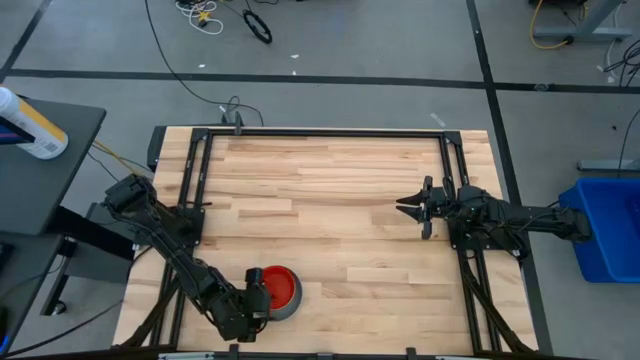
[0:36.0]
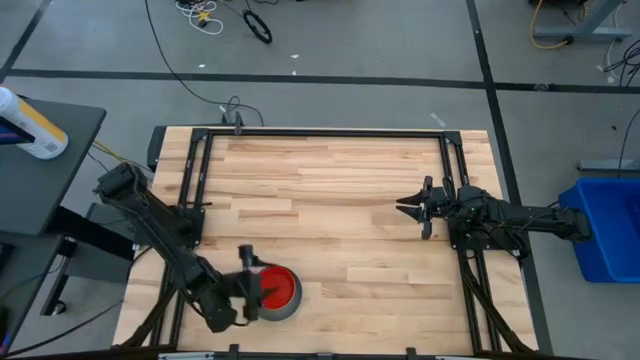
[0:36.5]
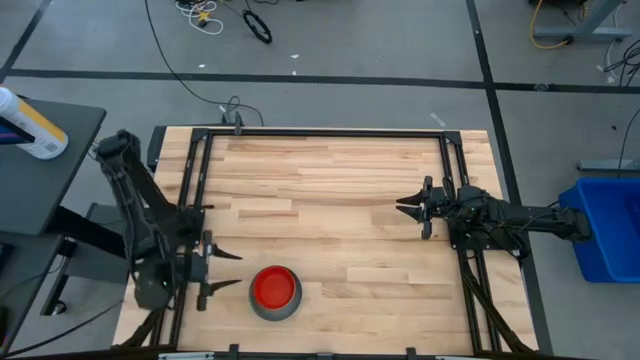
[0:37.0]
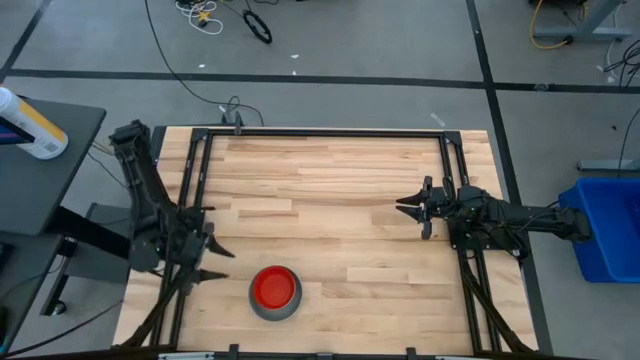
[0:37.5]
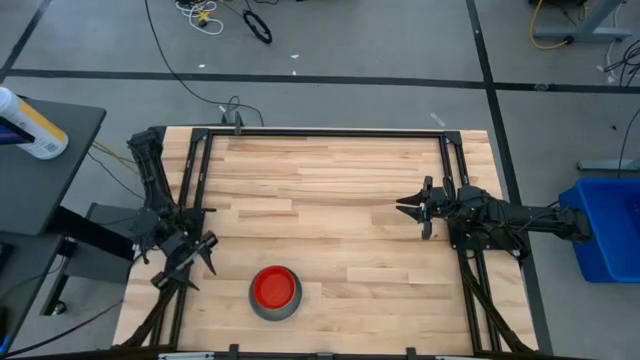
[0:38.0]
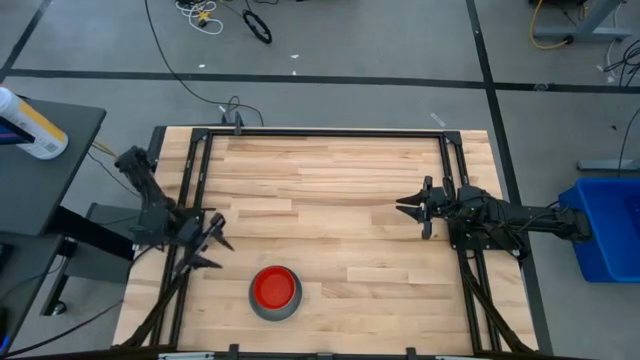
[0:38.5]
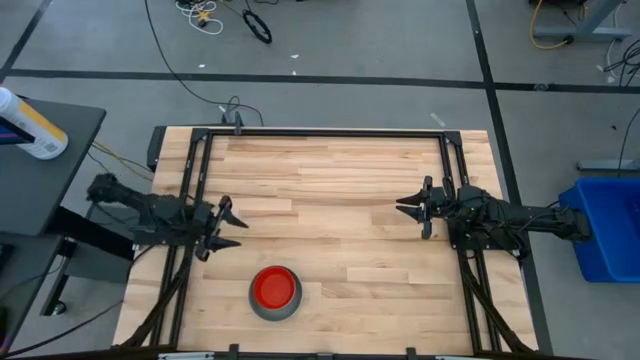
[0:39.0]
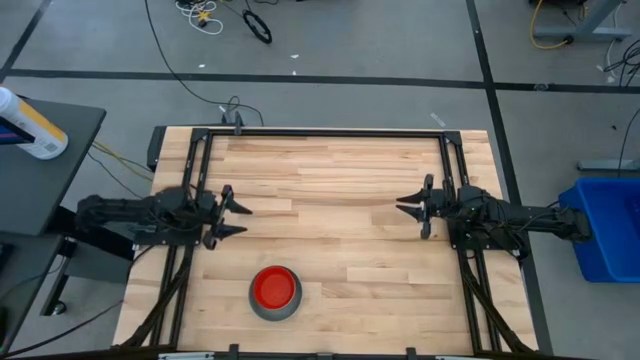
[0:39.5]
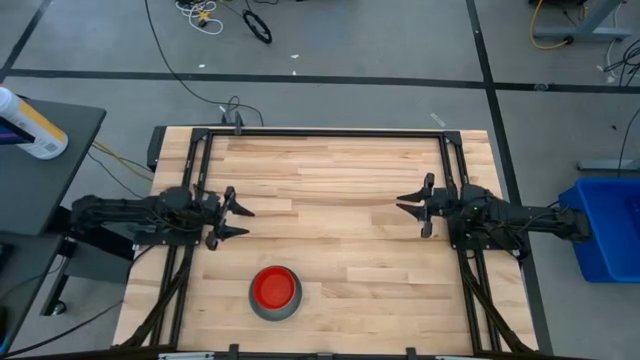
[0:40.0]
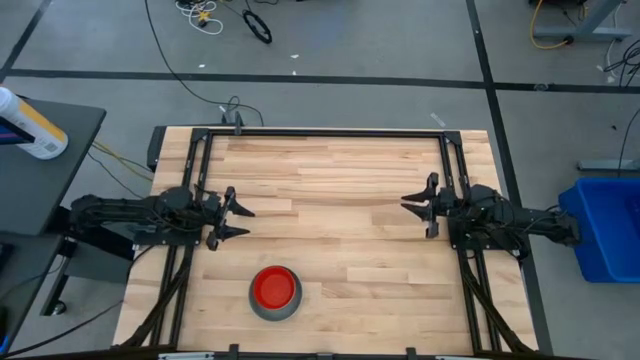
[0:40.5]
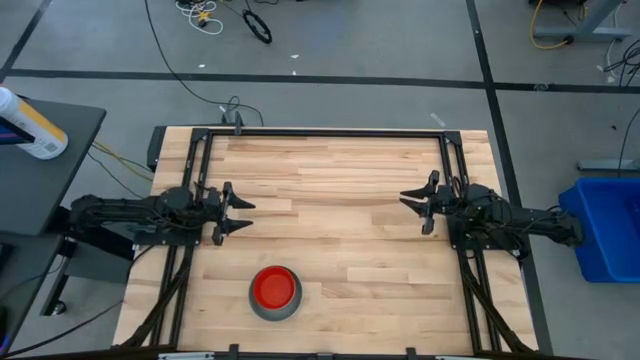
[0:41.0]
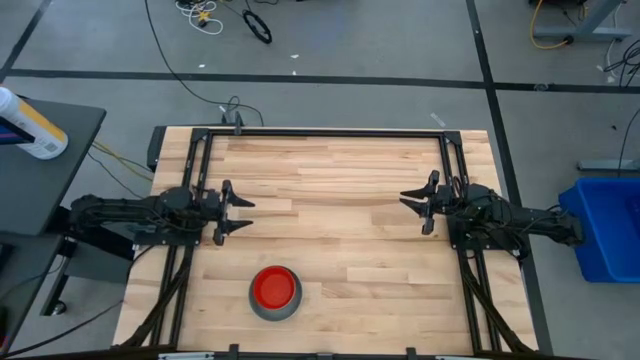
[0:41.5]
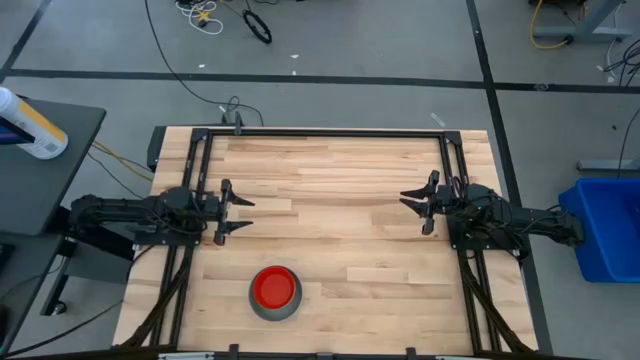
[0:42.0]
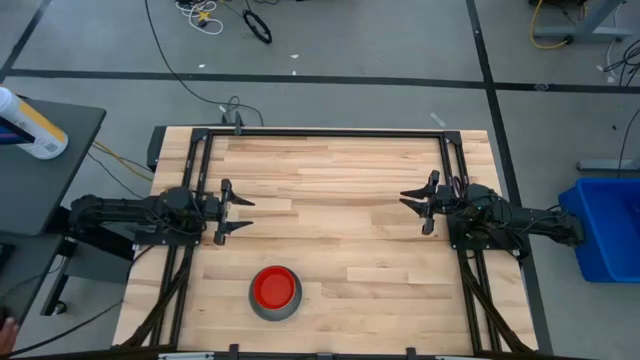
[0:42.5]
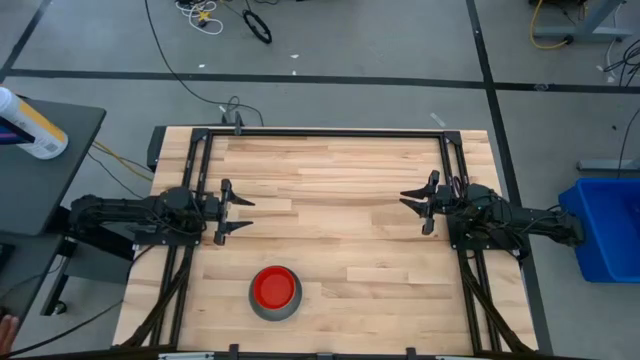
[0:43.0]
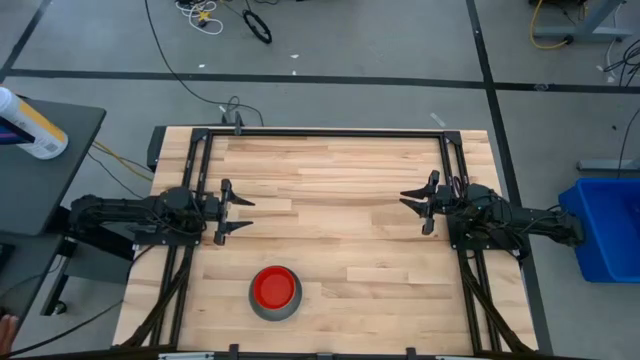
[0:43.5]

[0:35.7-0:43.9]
Return to Home Position
